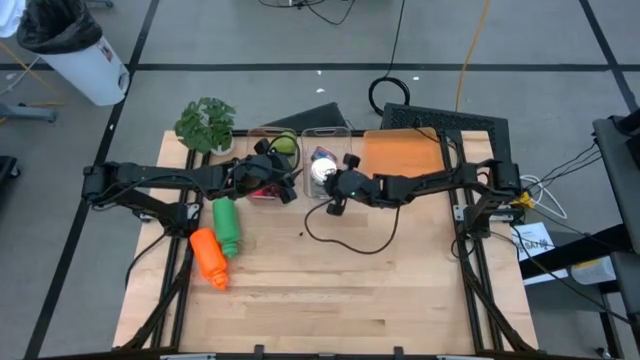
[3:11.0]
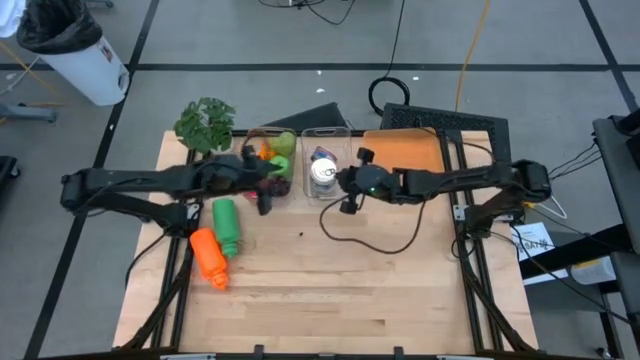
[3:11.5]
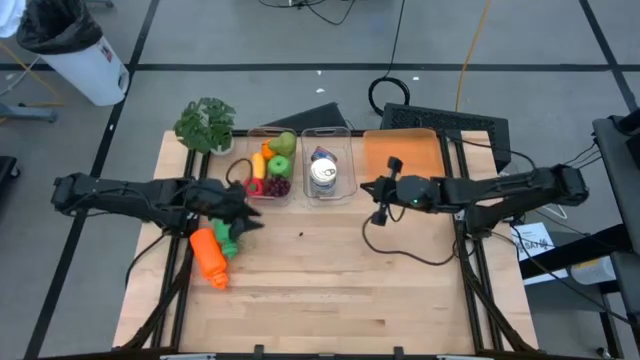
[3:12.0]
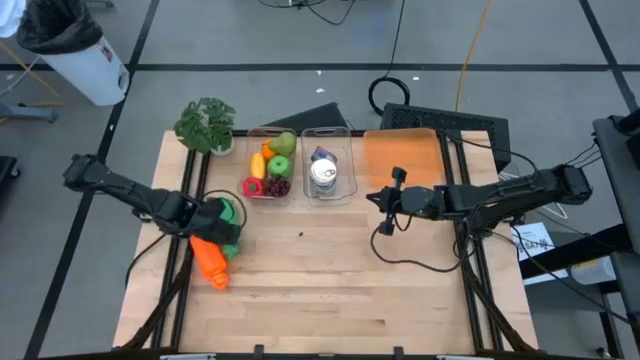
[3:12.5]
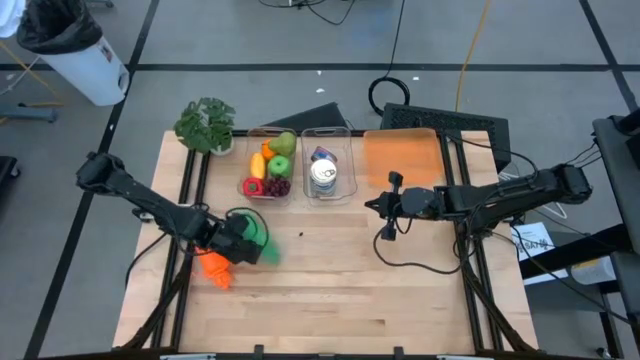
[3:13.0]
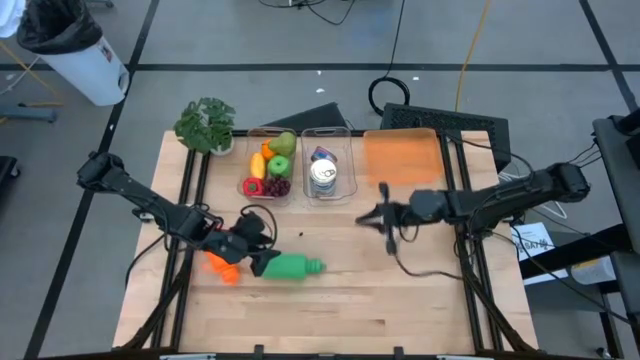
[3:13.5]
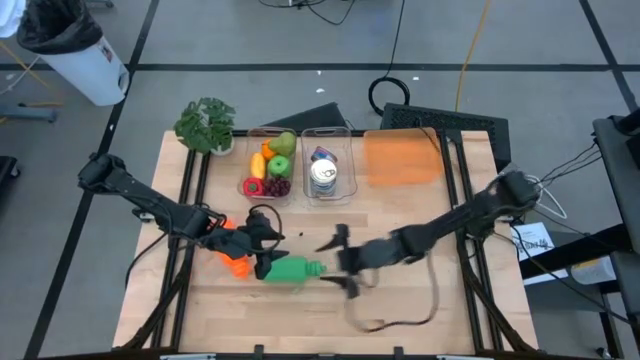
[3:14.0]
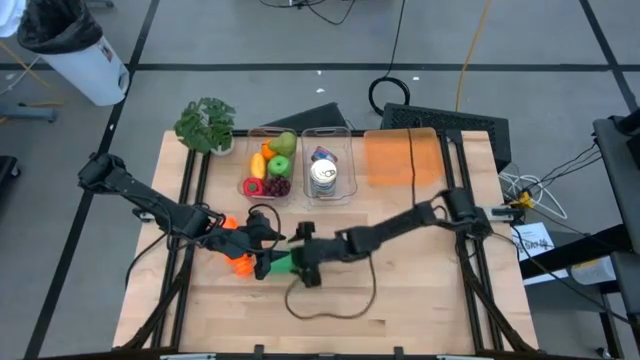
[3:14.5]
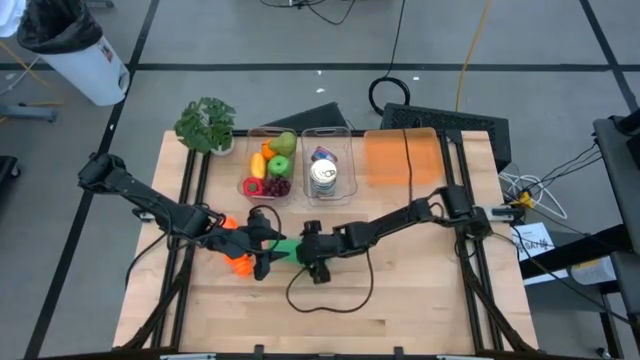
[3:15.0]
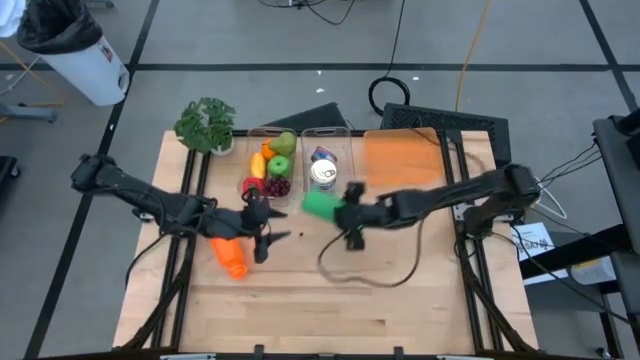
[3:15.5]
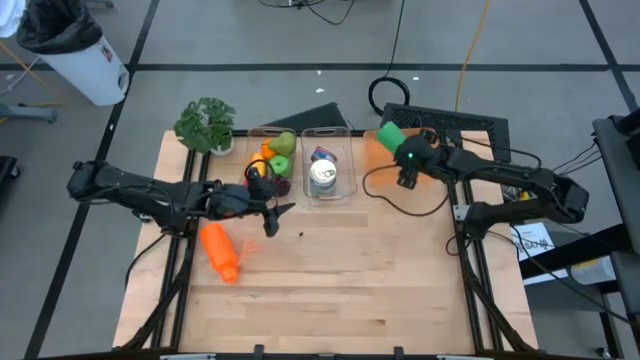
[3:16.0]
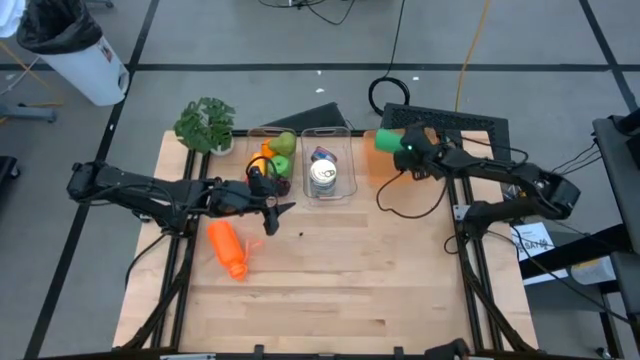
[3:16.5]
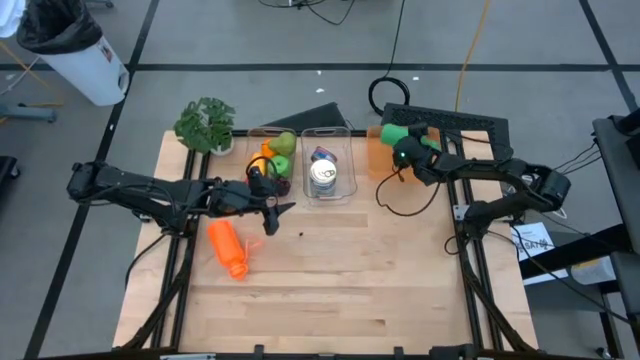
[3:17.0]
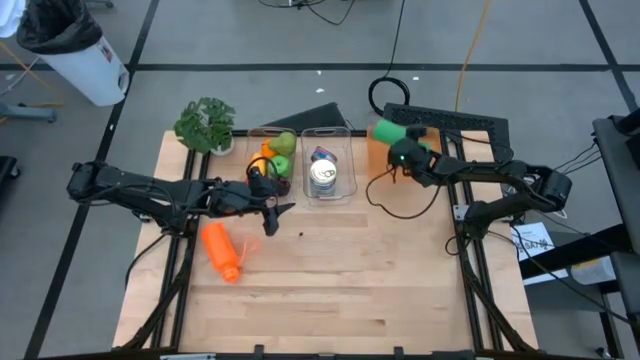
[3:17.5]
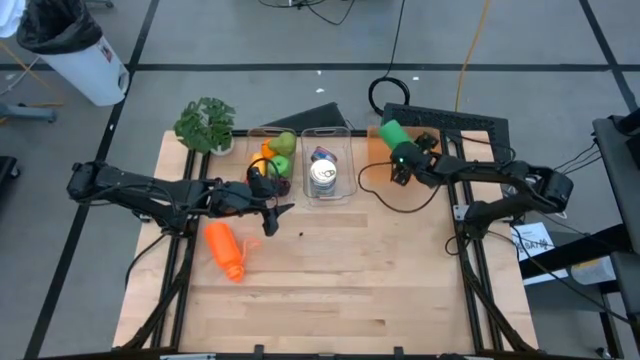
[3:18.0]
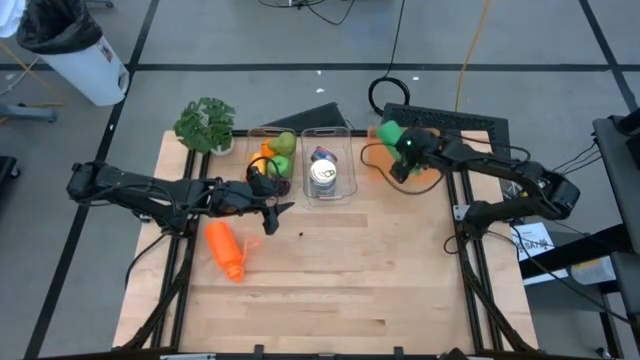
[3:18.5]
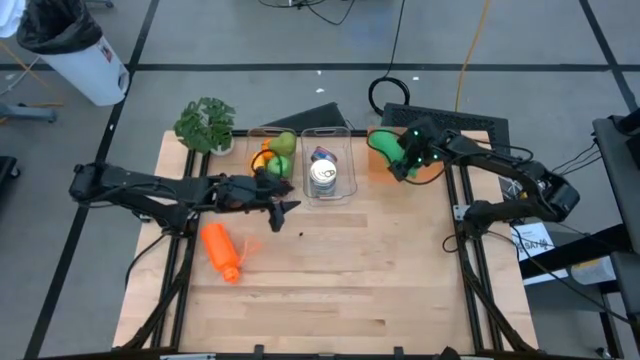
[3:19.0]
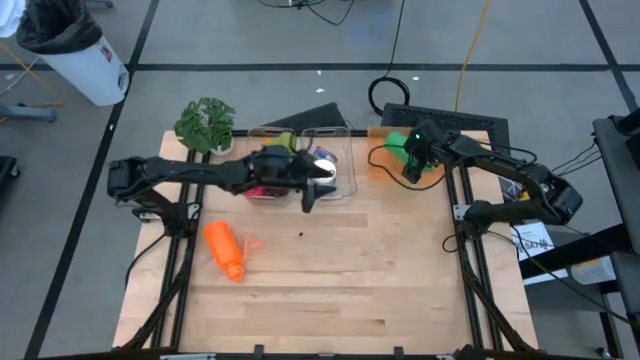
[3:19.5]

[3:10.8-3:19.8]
Task: Pick & Place Food Item
Put the green water bottle into the orange bin

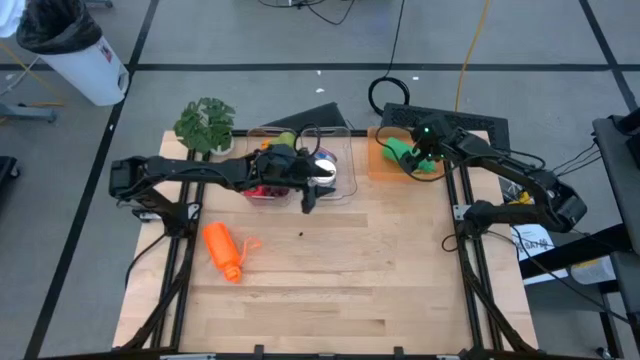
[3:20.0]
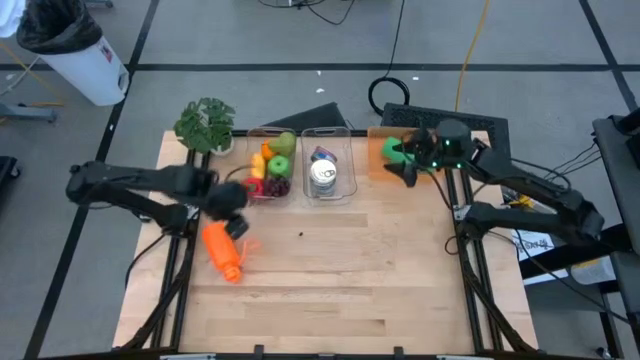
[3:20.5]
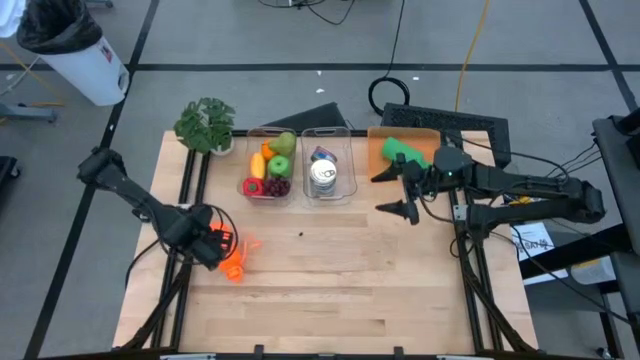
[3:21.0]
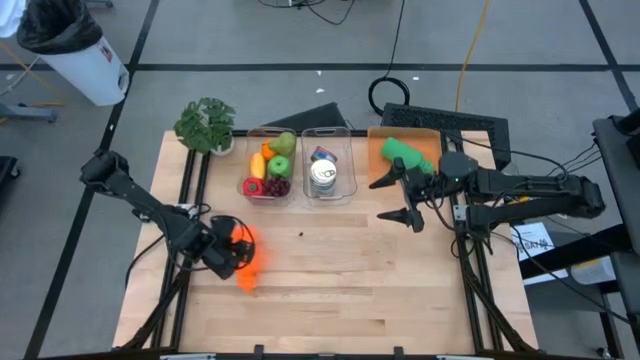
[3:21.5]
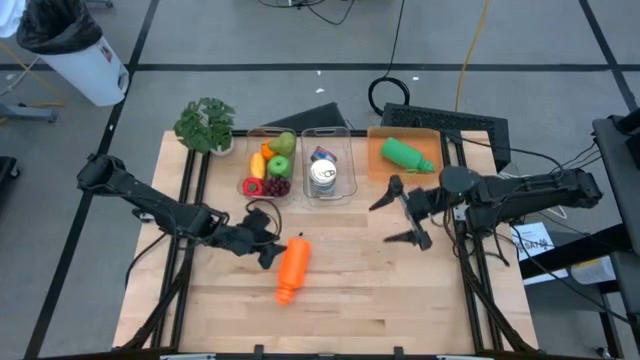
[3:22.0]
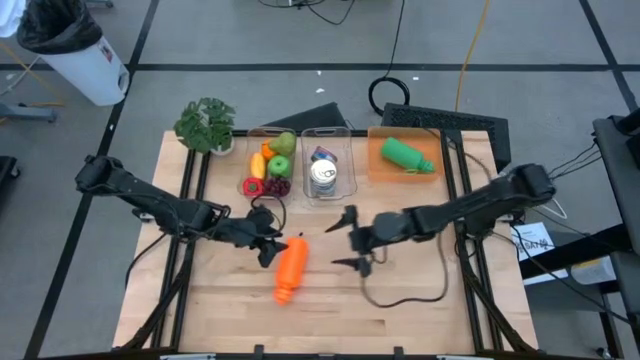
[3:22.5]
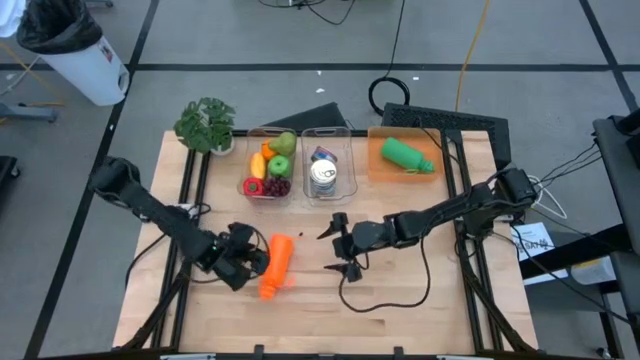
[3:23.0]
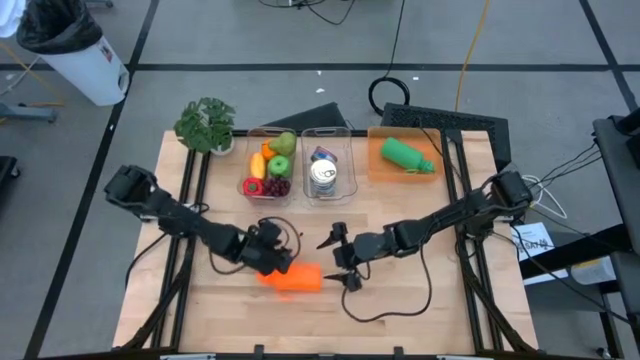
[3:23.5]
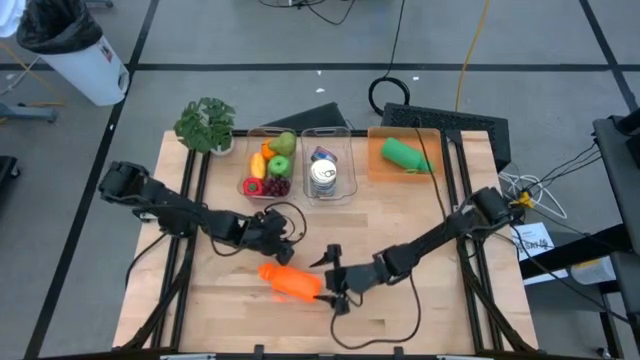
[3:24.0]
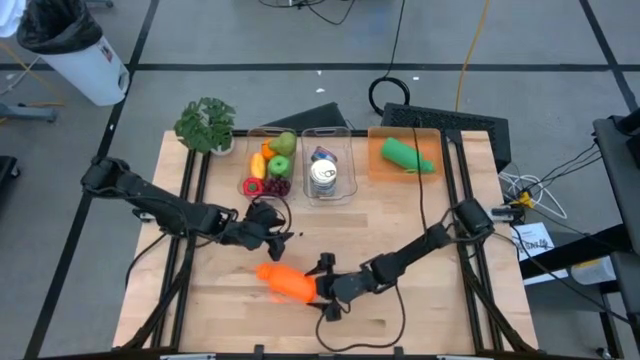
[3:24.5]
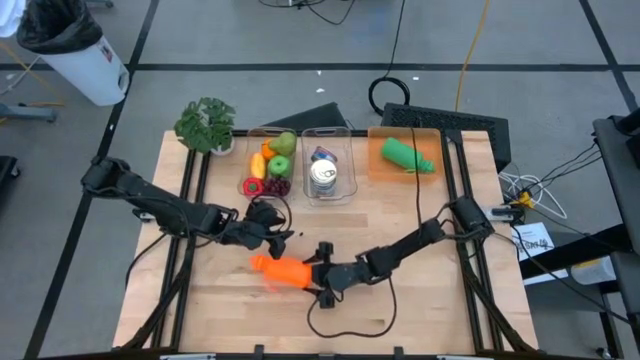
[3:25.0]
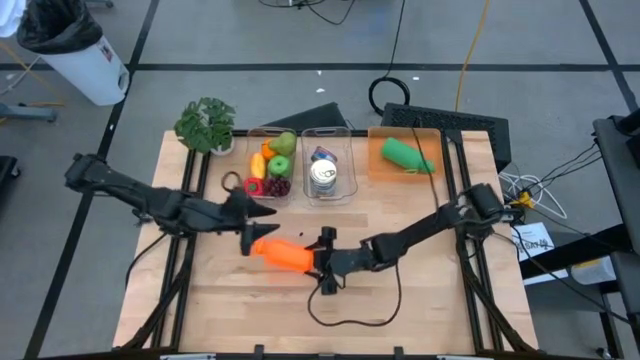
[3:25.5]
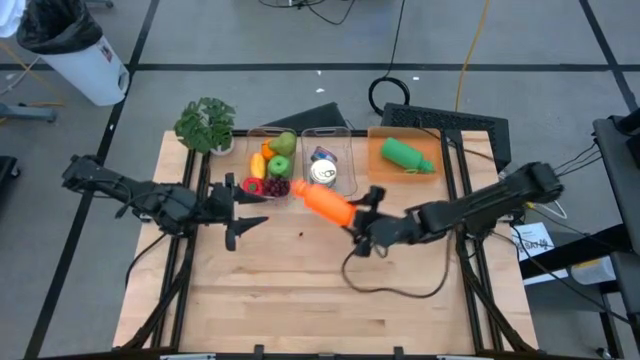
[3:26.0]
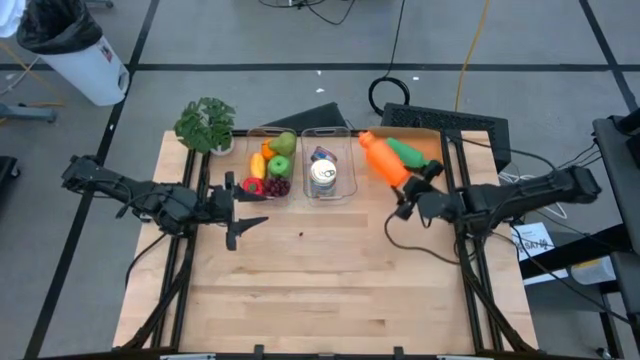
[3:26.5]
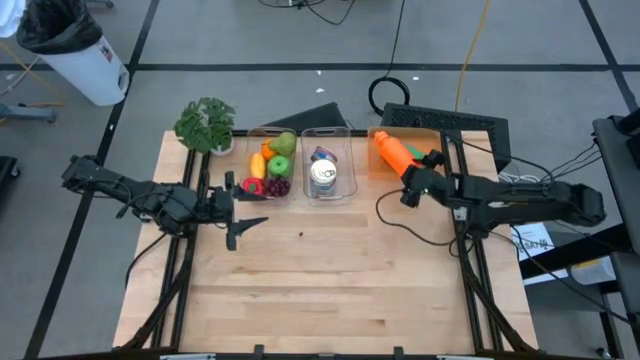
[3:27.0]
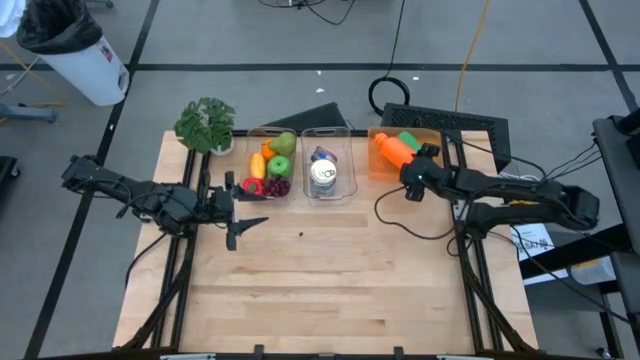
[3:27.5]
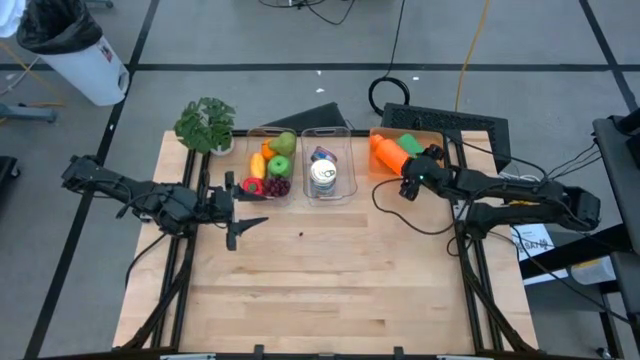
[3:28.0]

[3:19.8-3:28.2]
Put the orange water bottle into the orange bin

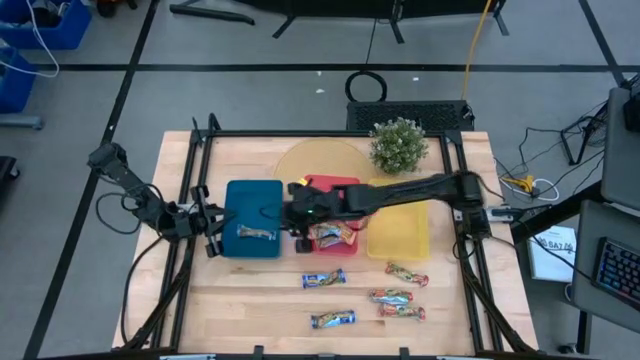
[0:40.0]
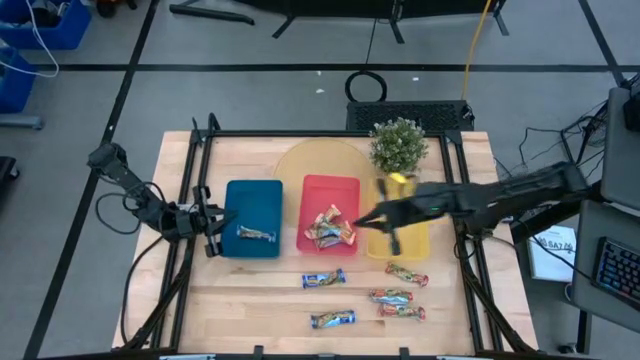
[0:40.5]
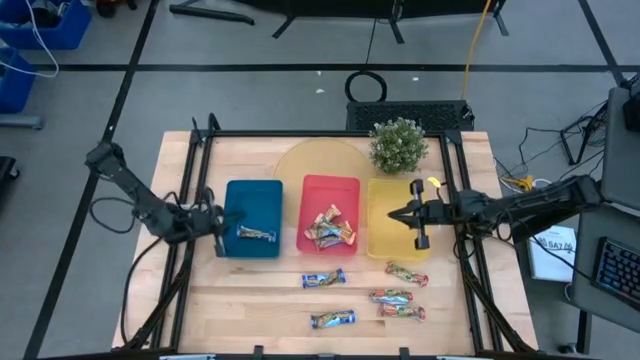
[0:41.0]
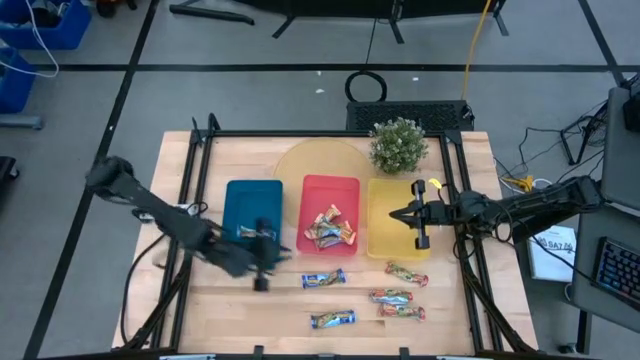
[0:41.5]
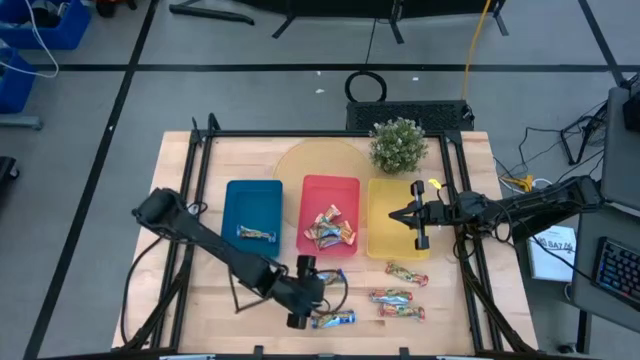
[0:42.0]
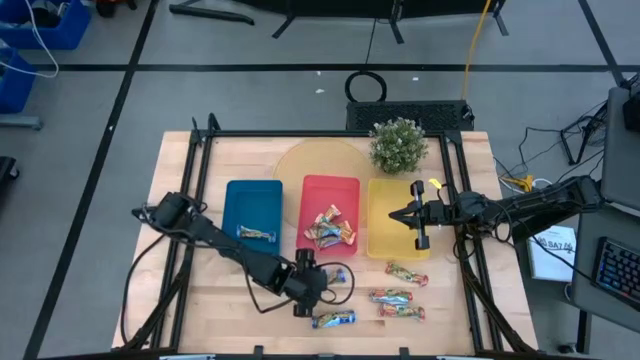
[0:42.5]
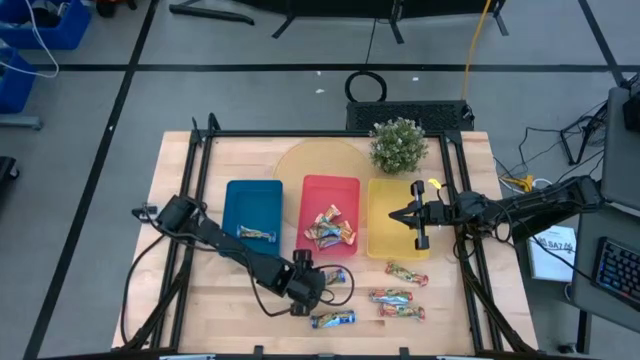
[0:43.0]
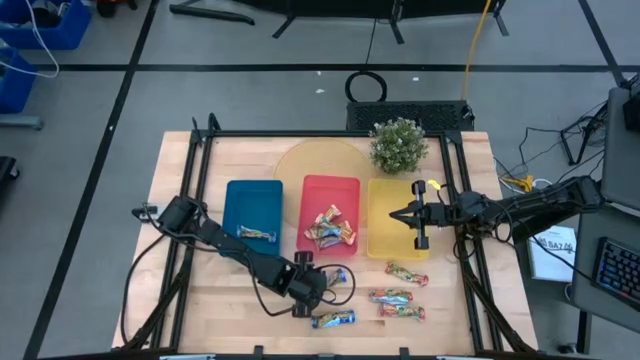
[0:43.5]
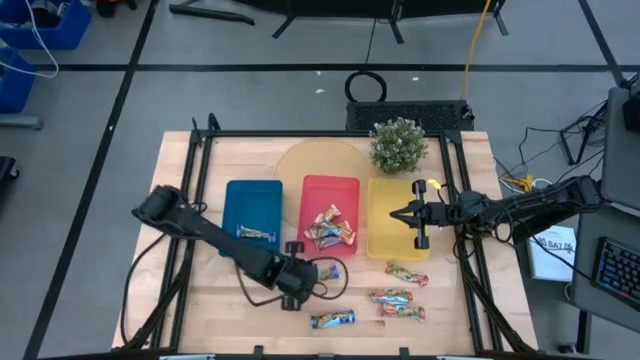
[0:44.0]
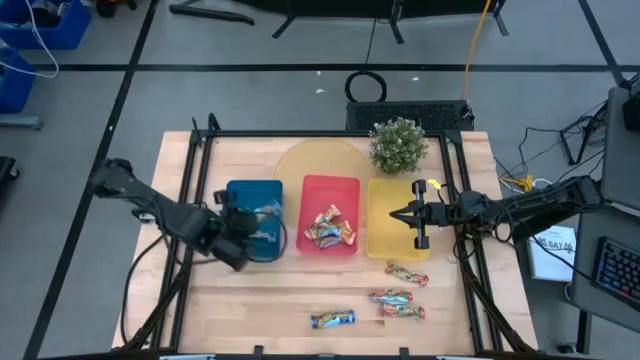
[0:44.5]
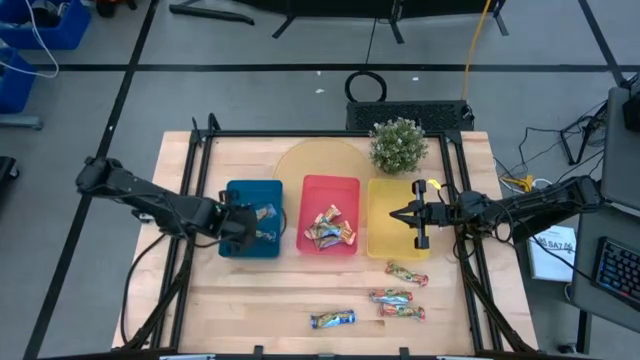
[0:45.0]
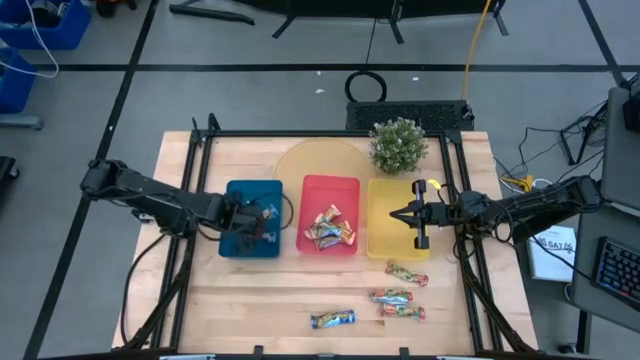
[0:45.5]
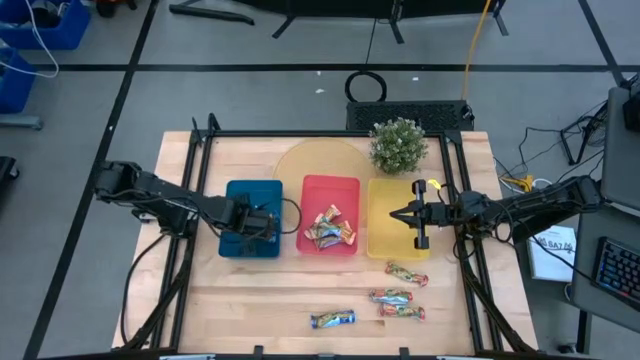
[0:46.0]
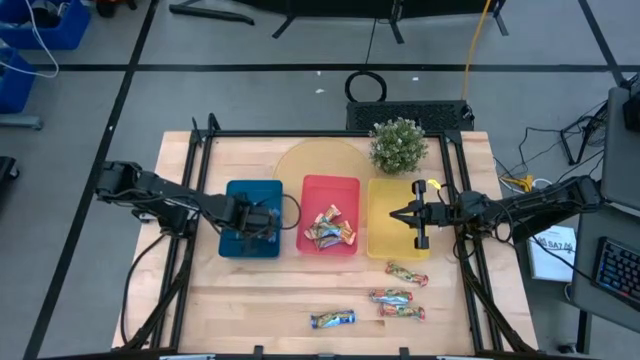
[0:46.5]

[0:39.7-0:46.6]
Task: Pick and place Granola Bars by type
Put the blue granola bar into the blue bin
